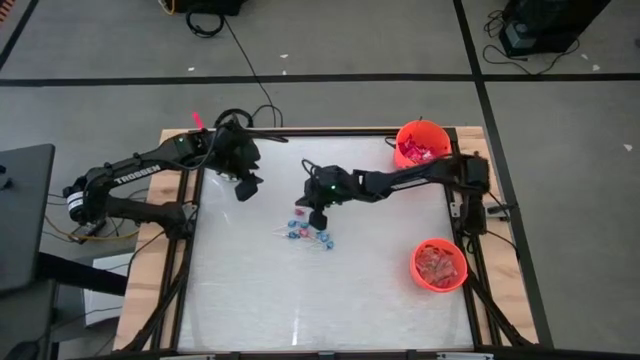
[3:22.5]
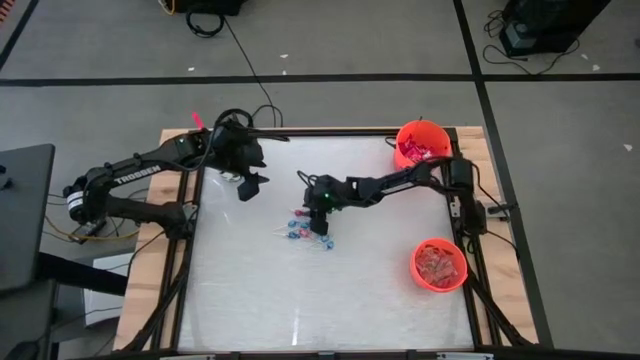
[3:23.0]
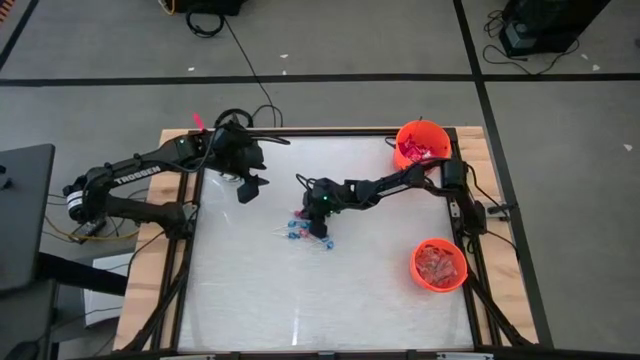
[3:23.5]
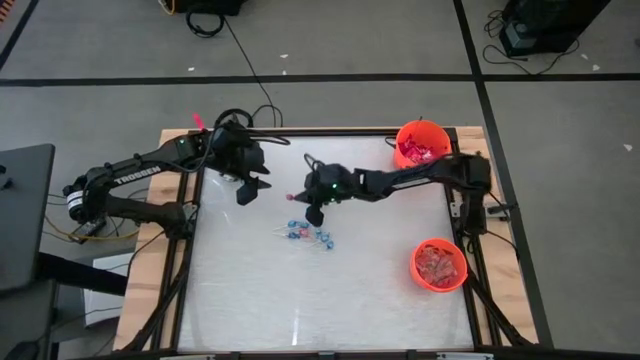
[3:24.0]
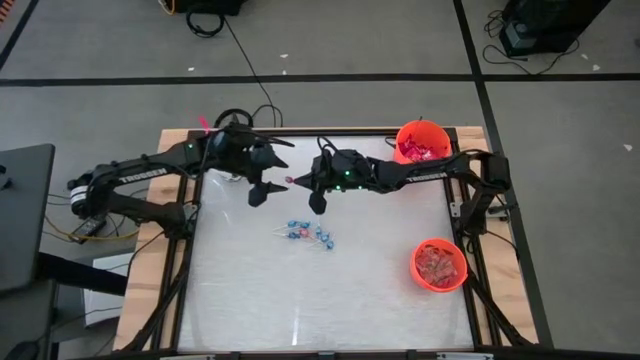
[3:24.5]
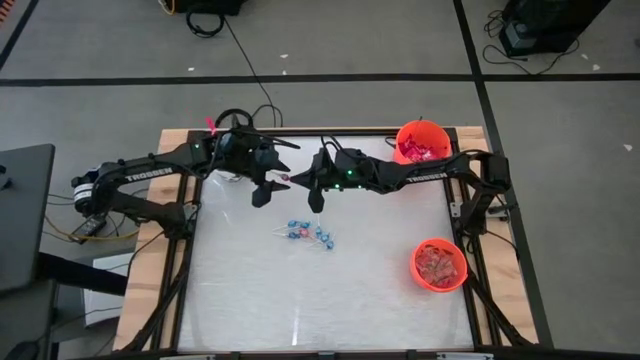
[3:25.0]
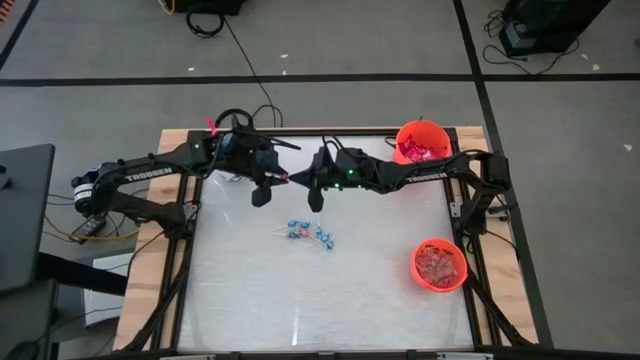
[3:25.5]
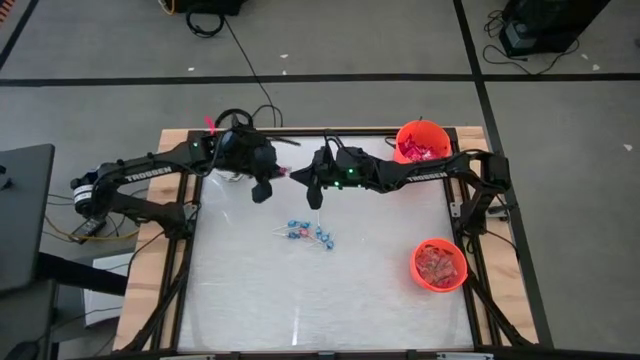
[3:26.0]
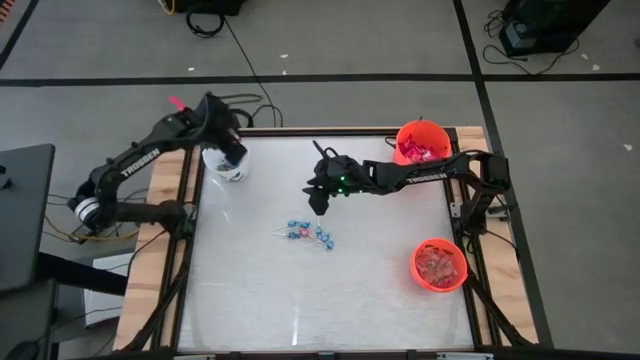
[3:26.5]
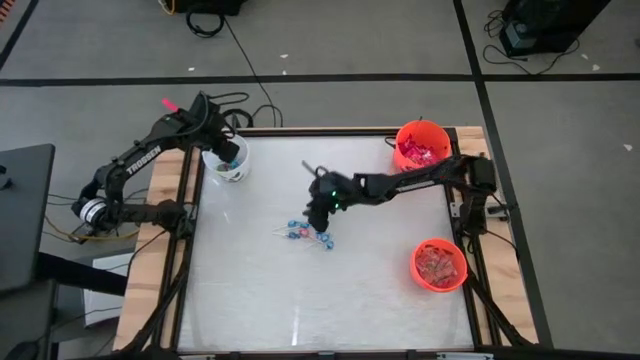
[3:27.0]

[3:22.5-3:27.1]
Task: Sort candy by brand, put in halloween buckets
Put the red candy into the white bucket

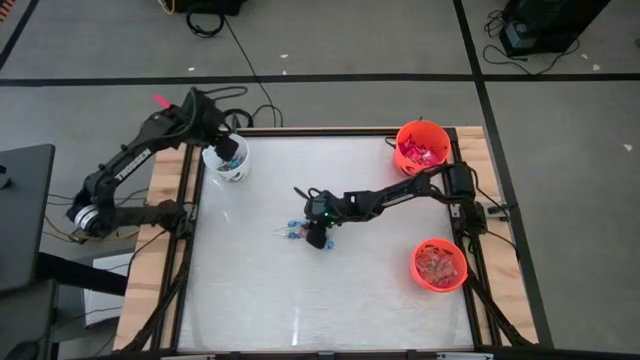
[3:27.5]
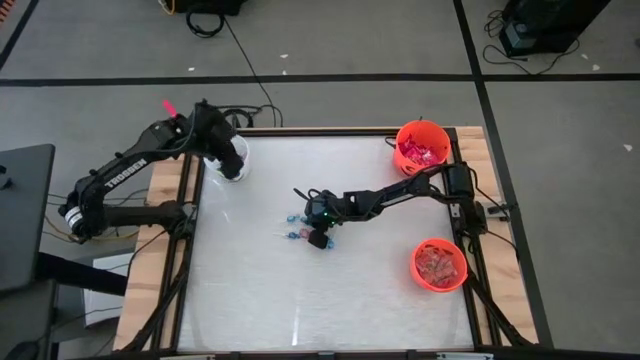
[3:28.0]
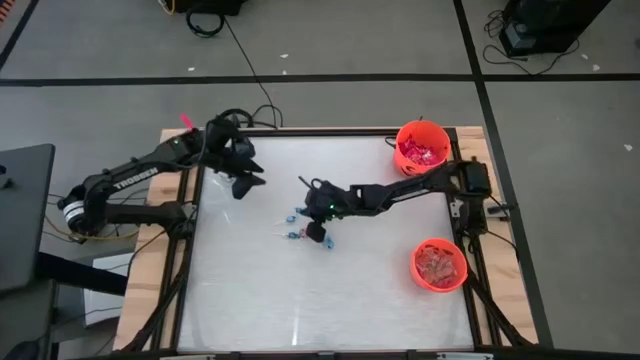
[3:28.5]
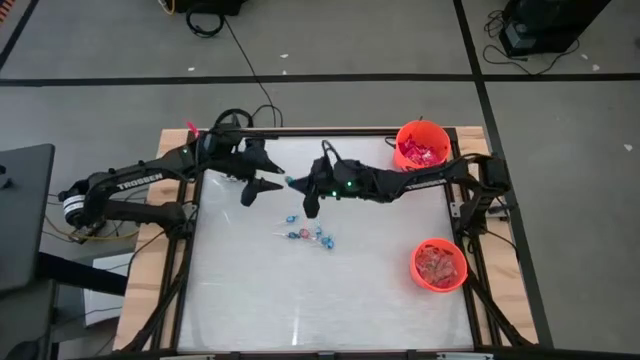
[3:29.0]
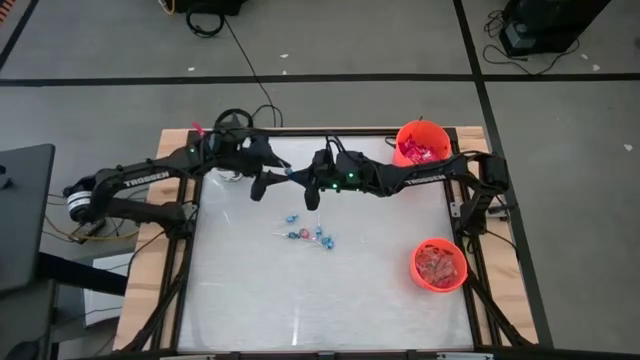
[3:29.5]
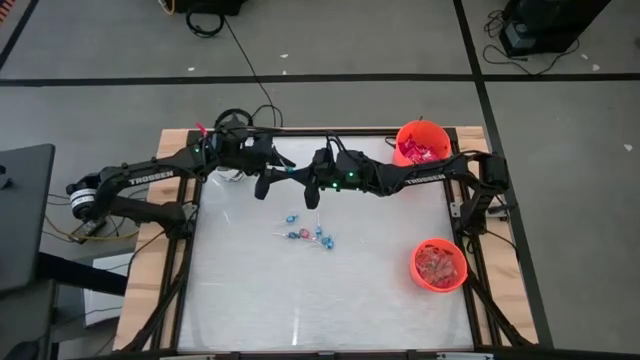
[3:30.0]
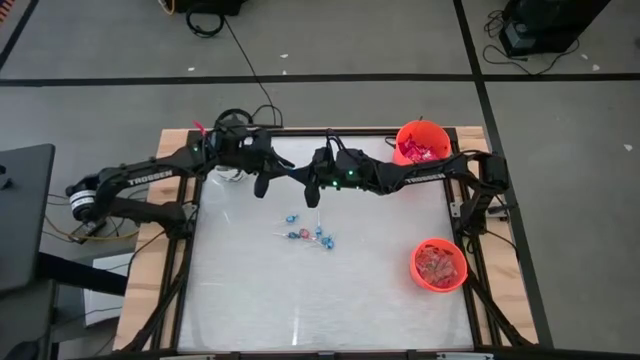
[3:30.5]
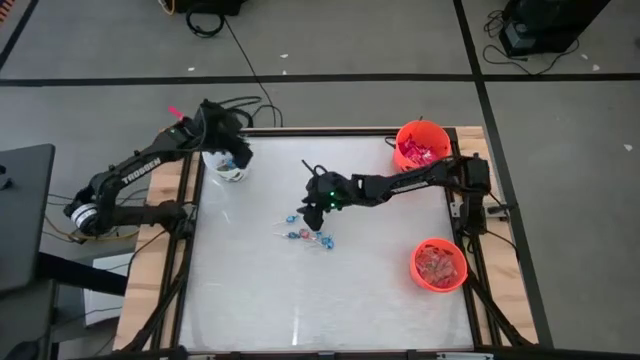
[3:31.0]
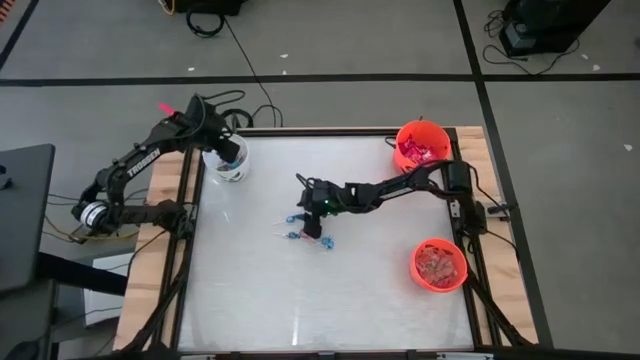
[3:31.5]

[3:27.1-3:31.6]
Put the blue candy into the white bucket

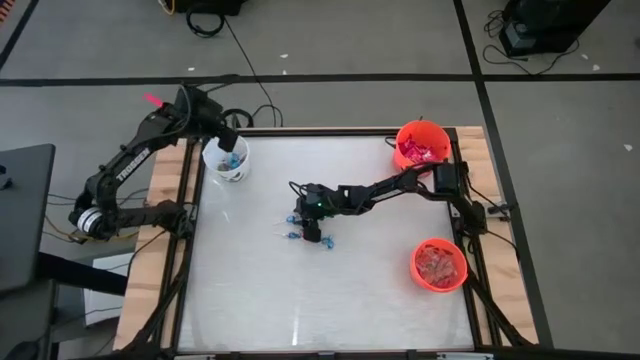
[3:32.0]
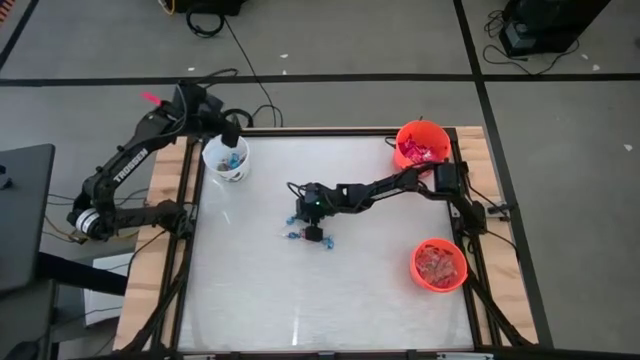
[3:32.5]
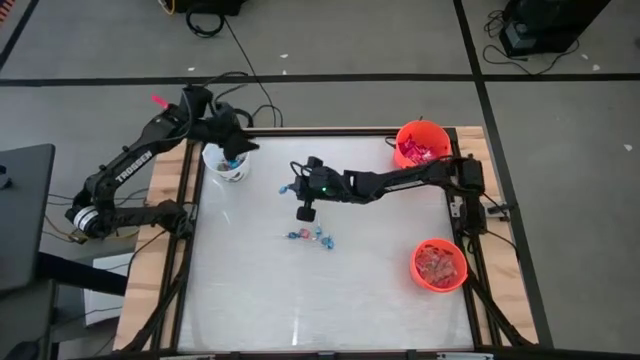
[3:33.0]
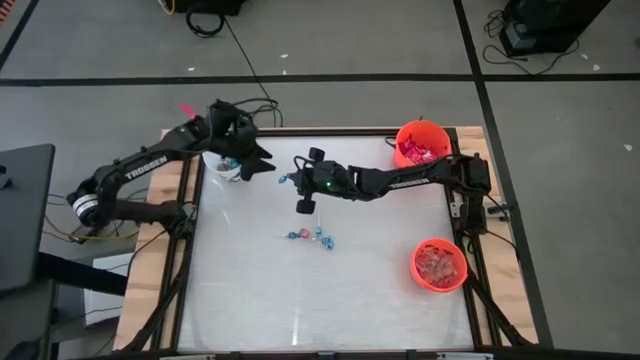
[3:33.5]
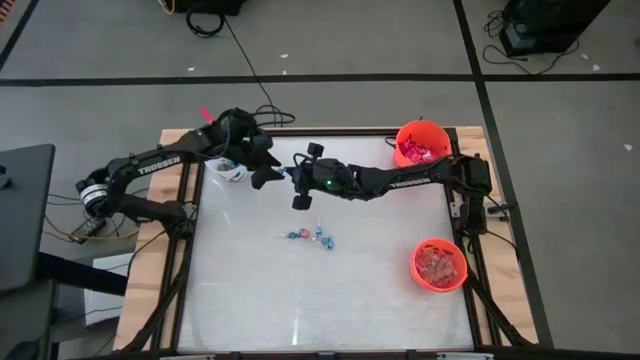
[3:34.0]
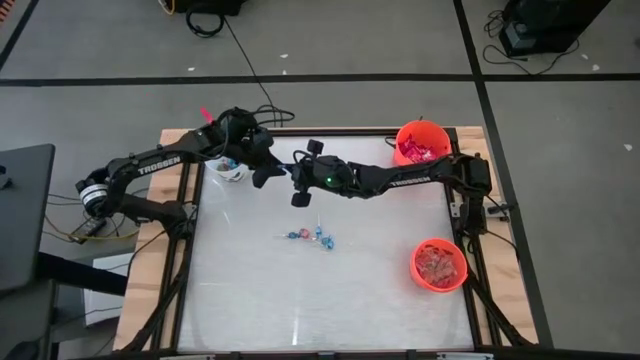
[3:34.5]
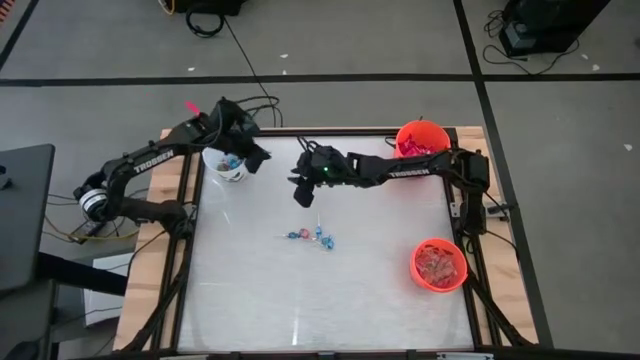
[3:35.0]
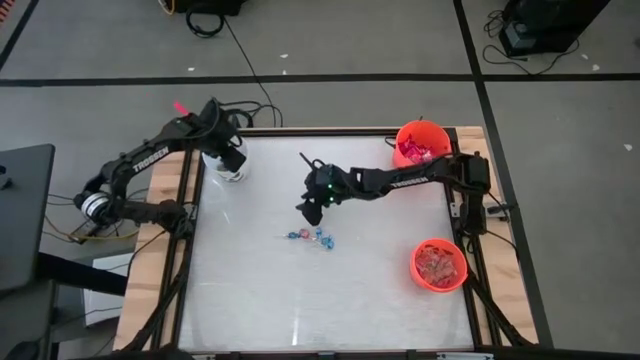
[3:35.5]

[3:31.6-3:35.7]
Put the blue candy into the white bucket

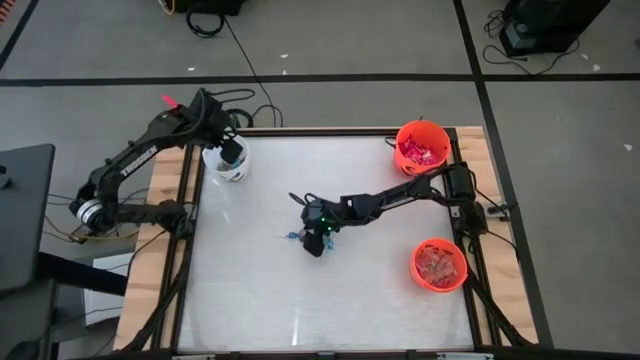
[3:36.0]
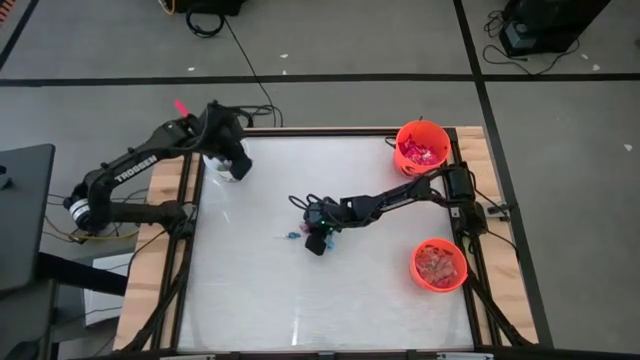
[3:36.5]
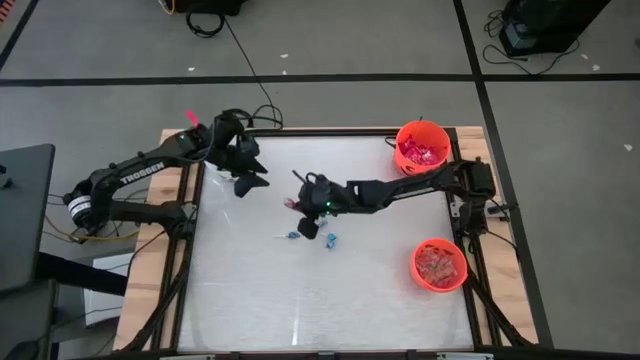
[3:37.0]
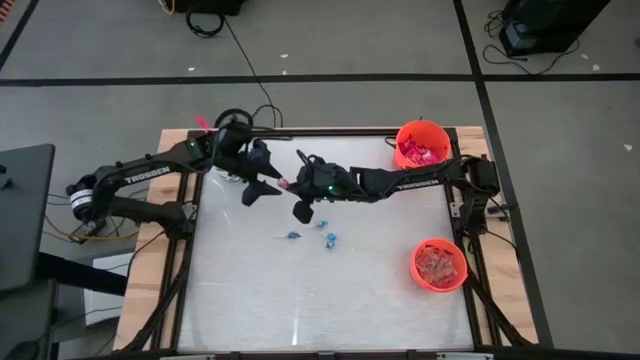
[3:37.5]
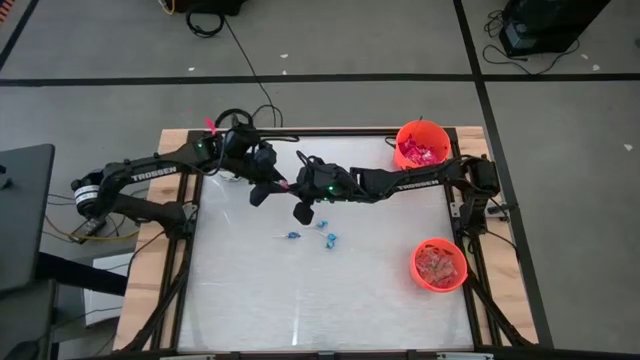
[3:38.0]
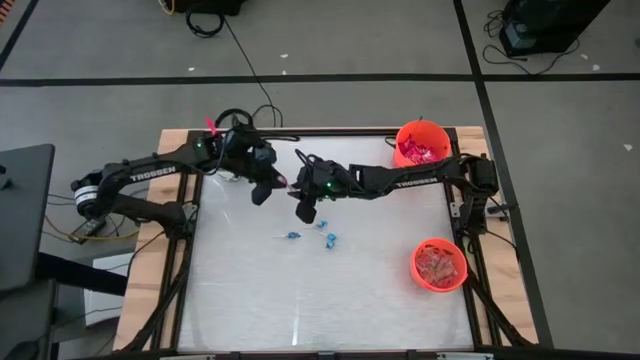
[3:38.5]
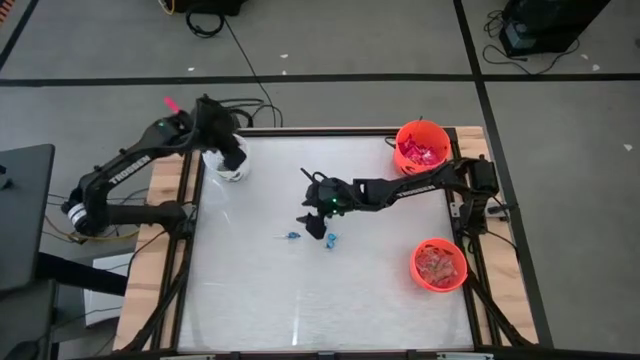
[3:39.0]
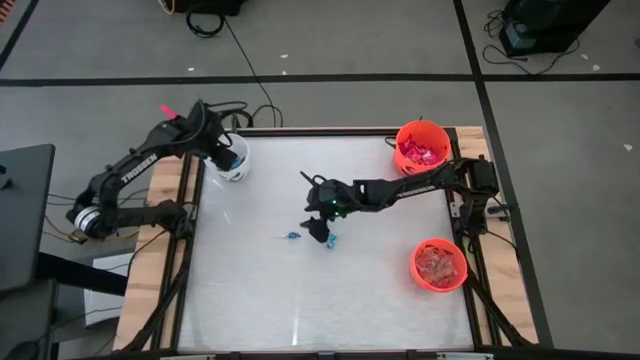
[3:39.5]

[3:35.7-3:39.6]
Put the red candy into the white bucket

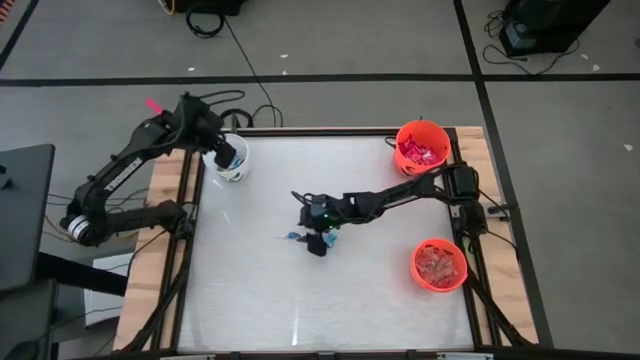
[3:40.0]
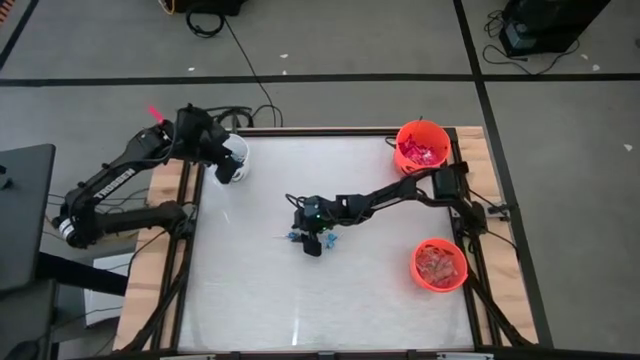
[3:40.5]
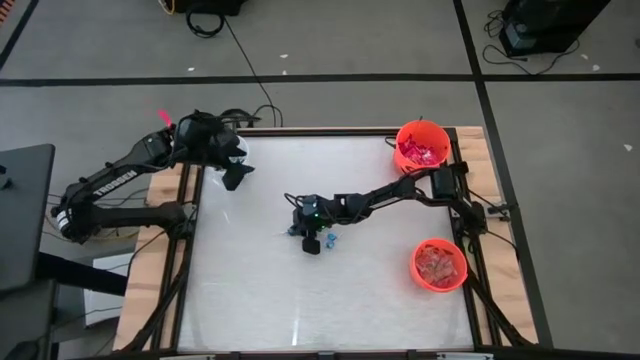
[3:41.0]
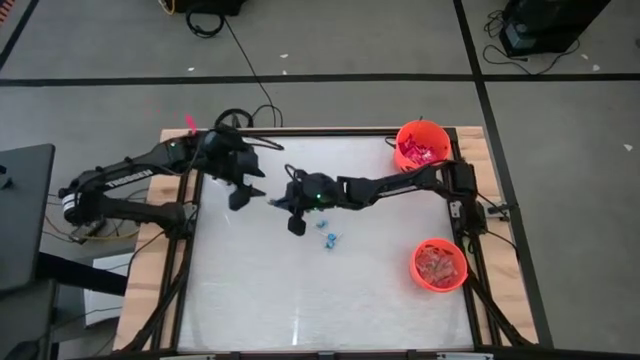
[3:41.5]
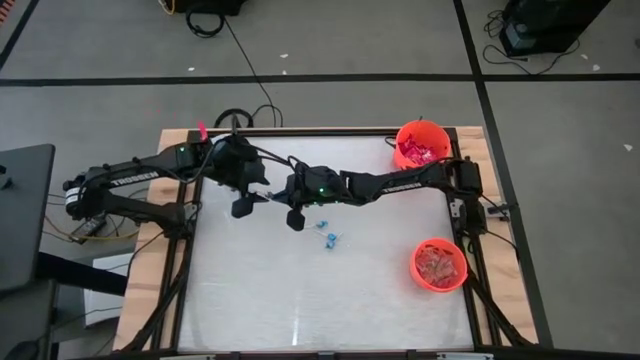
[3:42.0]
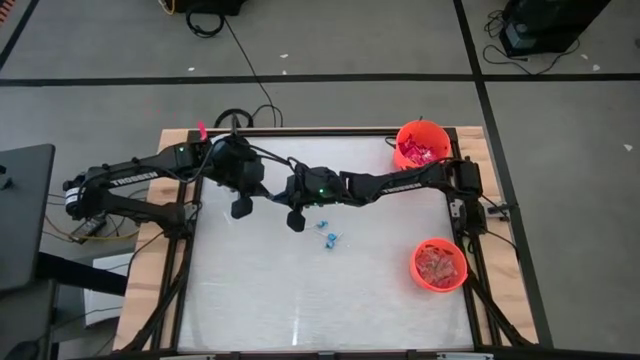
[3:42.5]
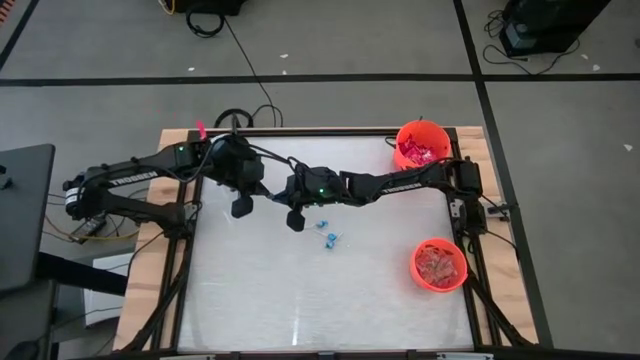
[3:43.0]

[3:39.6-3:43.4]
Put the blue candy into the white bucket
